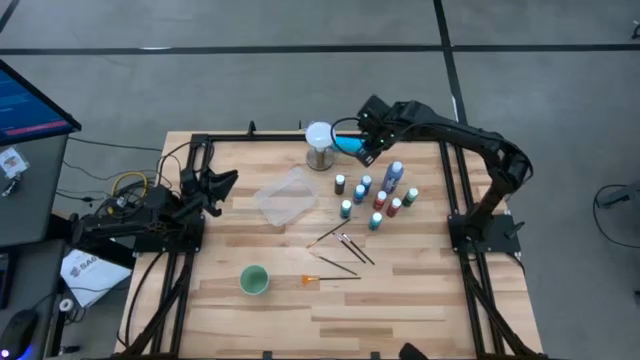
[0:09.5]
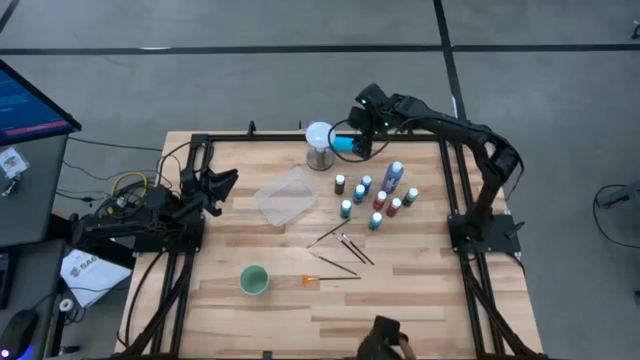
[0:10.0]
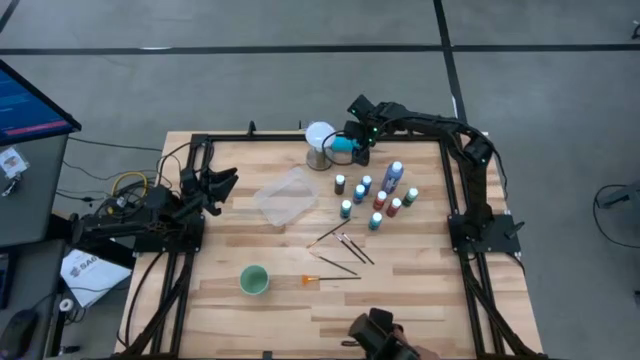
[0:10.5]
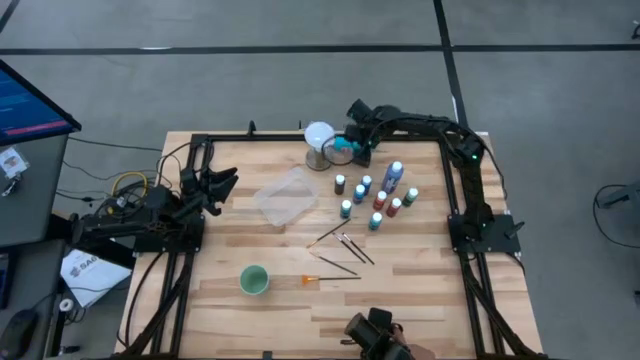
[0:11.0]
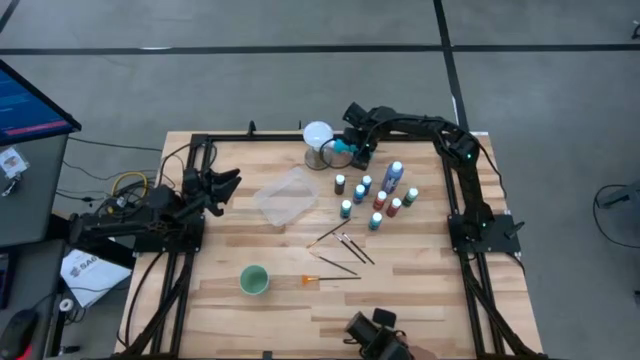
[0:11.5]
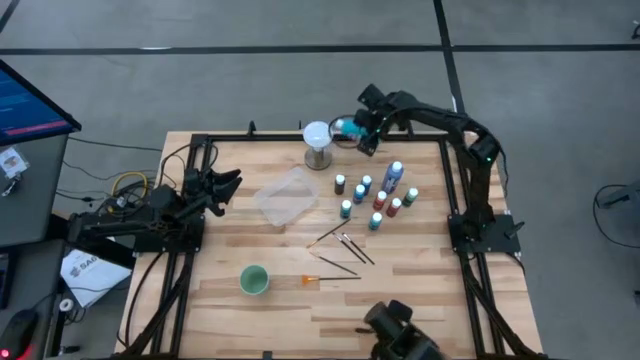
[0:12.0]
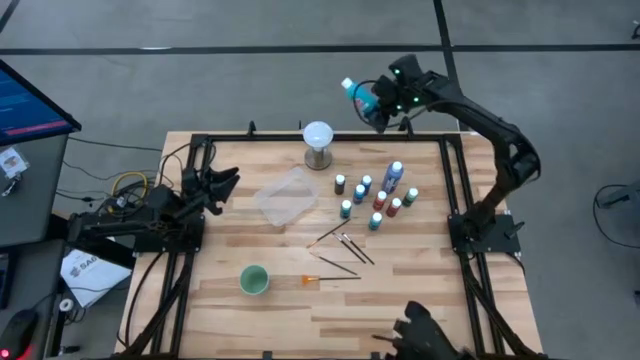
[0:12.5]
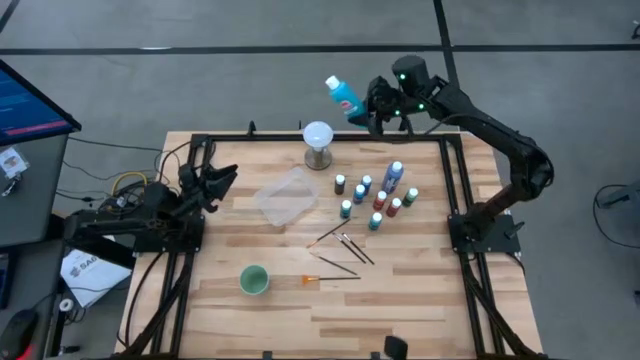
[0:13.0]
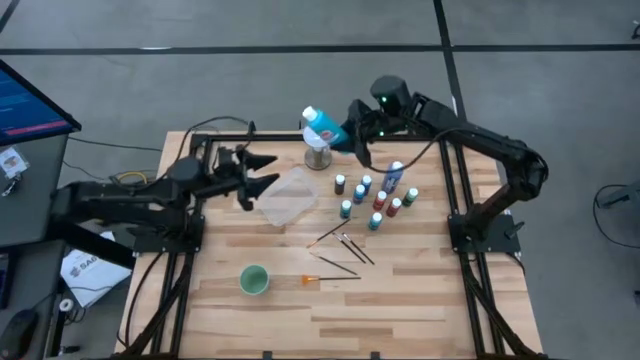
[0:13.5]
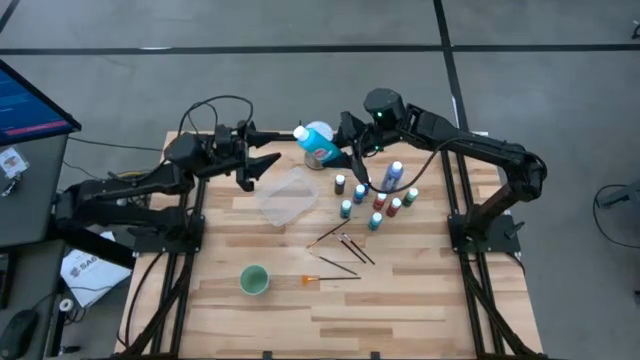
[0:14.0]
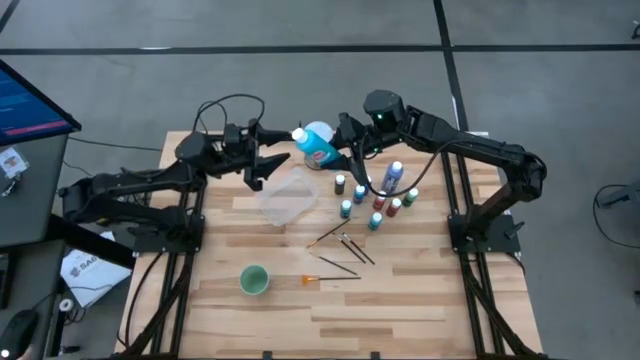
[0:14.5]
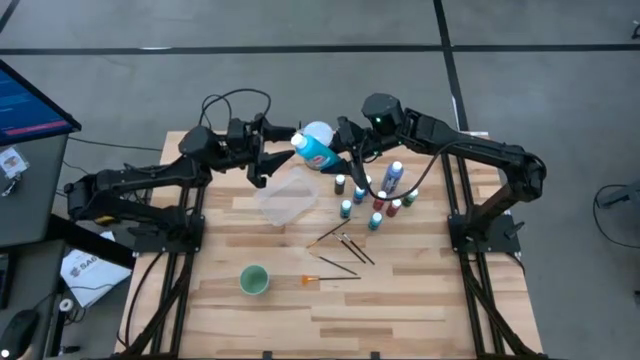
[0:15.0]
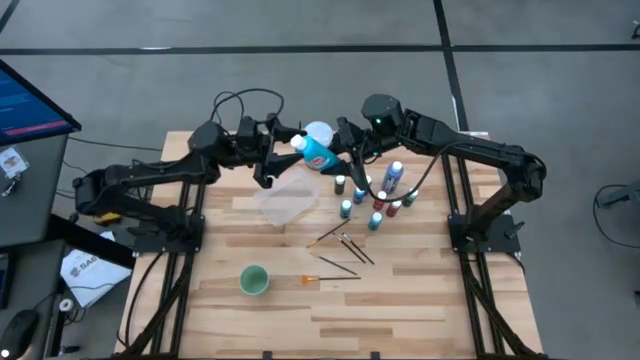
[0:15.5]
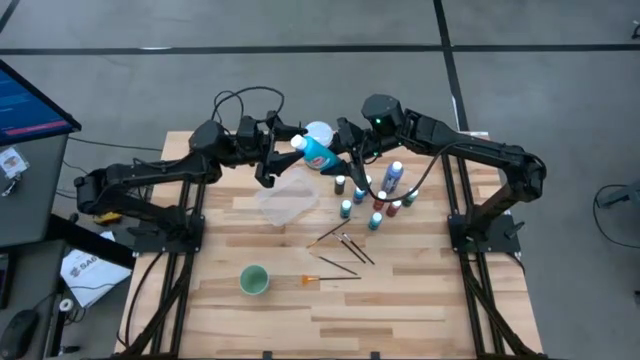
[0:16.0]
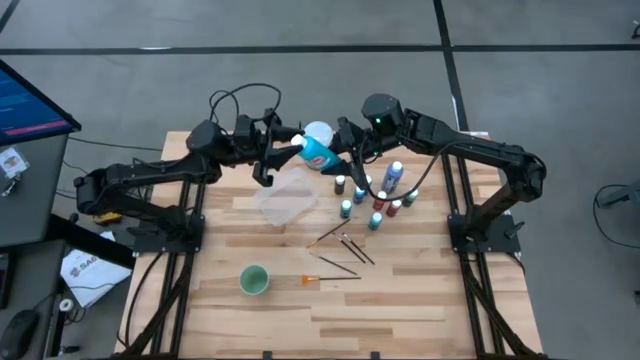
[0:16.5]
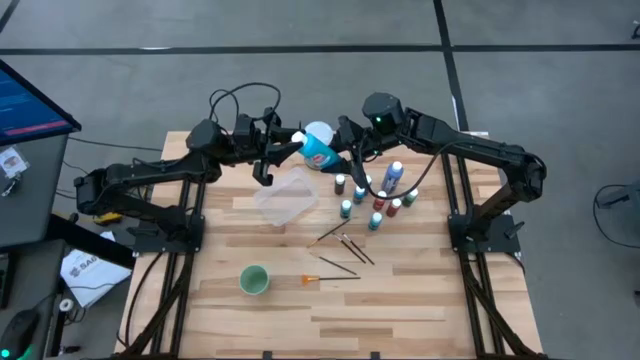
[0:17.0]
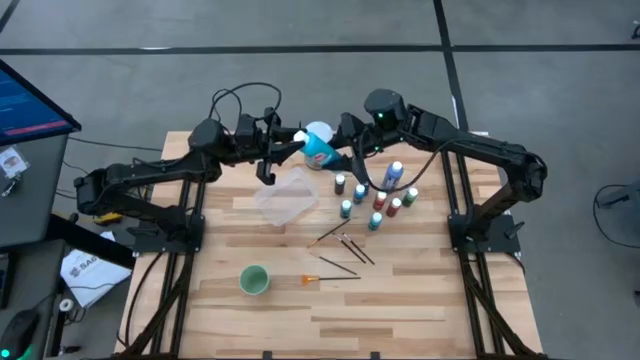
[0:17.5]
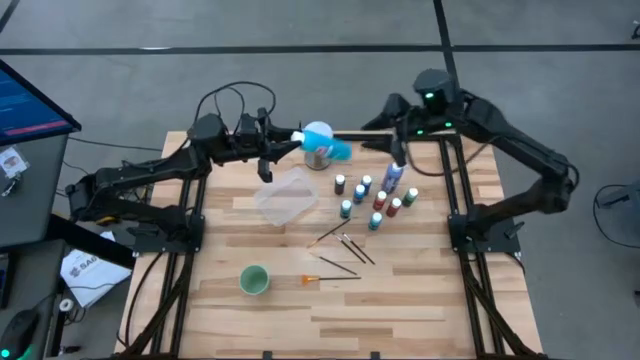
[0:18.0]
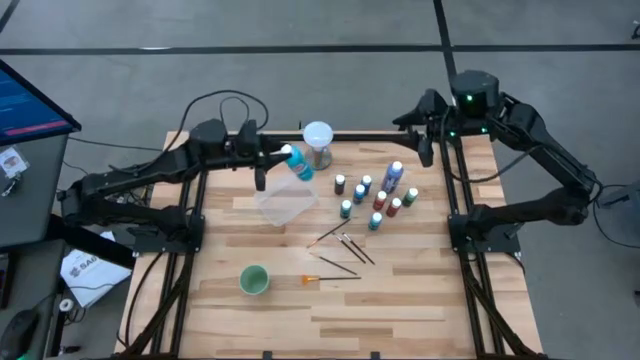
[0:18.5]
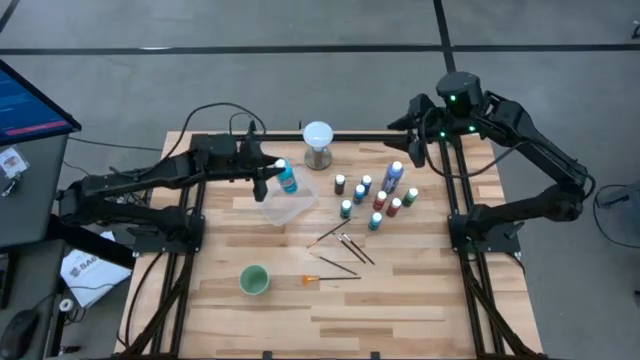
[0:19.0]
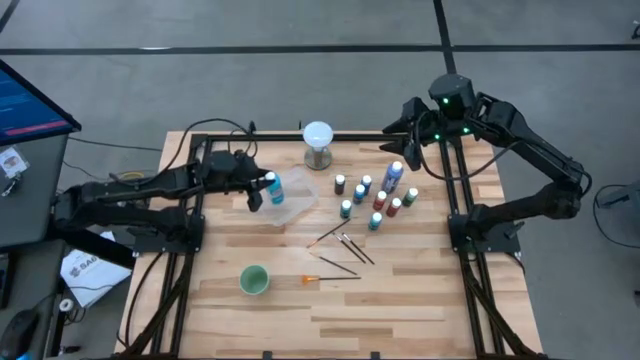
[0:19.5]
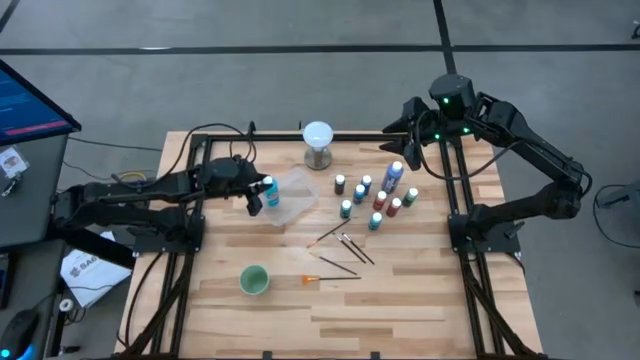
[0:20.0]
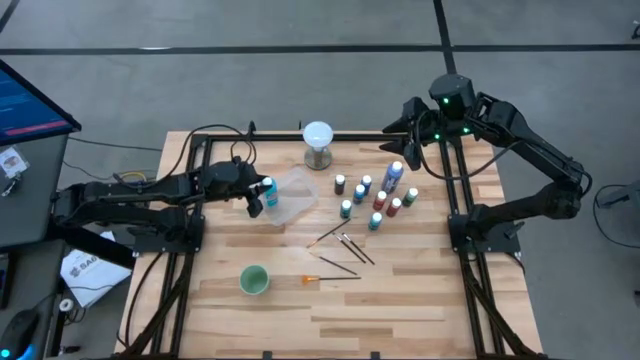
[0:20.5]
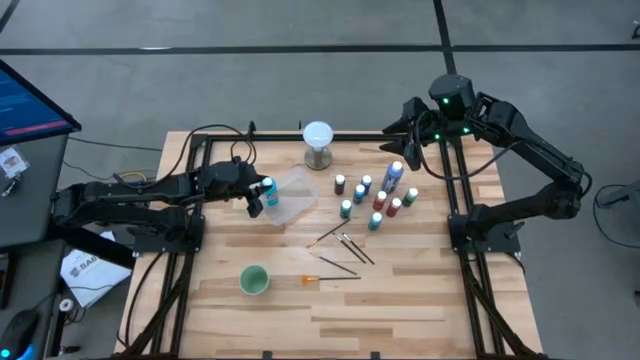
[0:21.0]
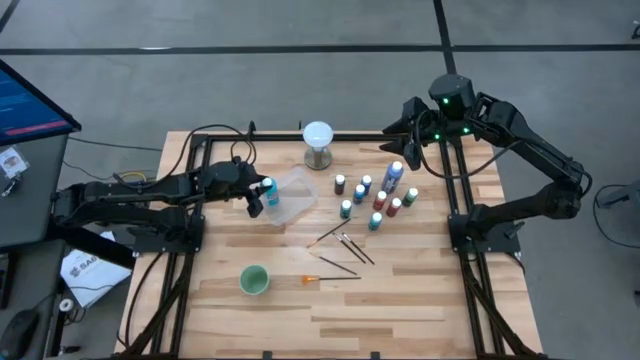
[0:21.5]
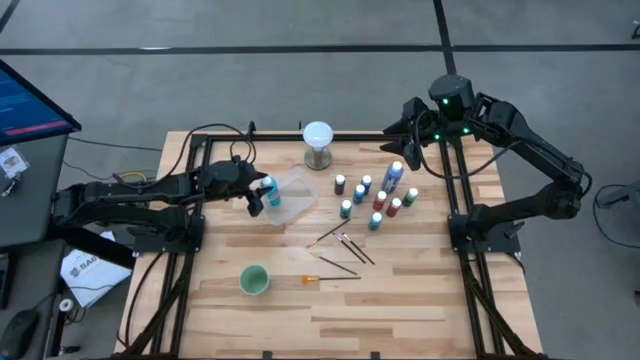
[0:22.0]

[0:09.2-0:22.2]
Task: Pick & Place Paint Supplies
Put the big light blue bottle into the white bin

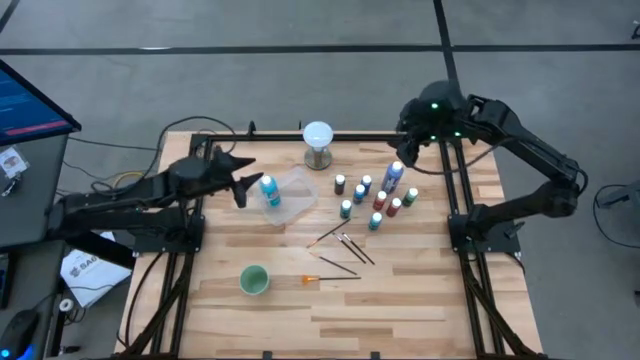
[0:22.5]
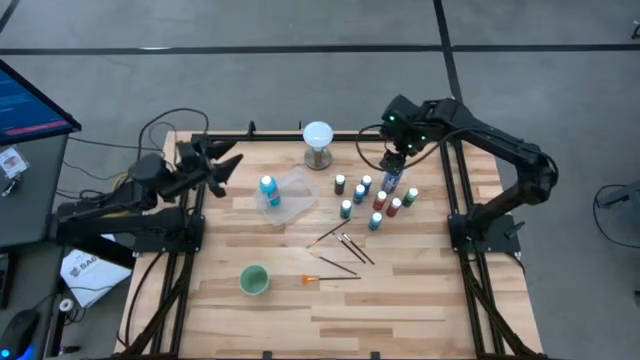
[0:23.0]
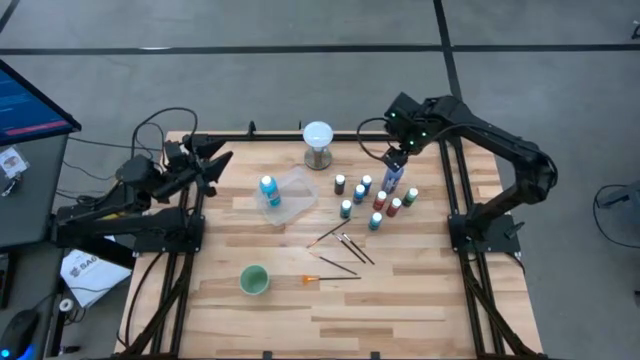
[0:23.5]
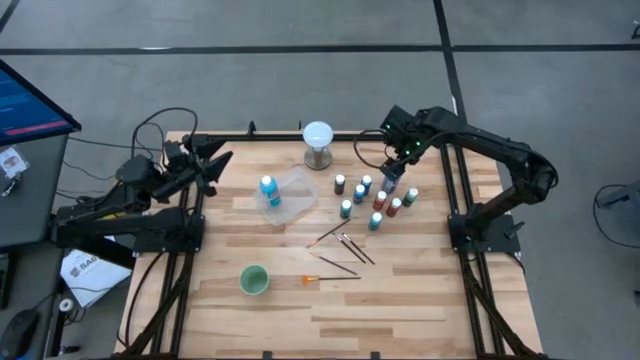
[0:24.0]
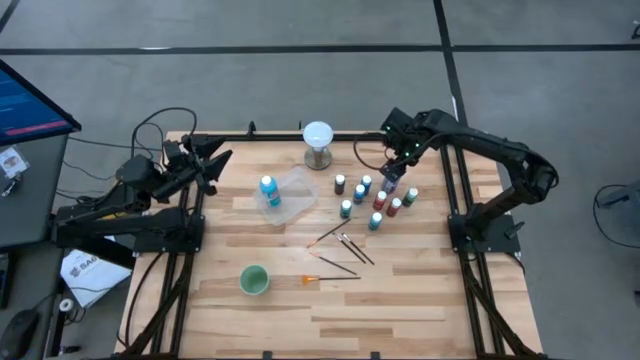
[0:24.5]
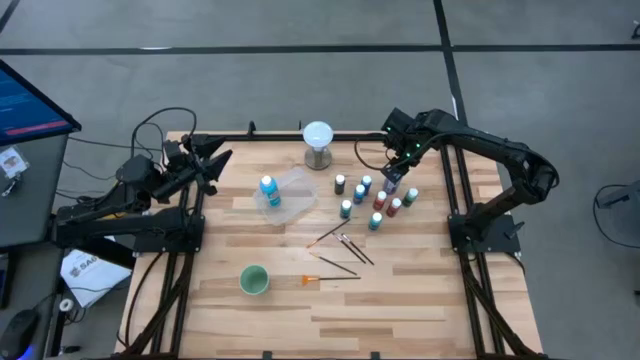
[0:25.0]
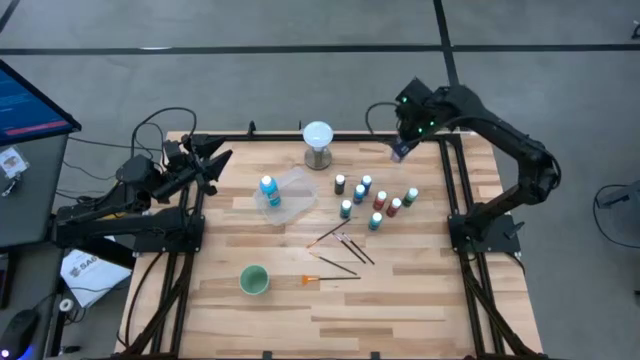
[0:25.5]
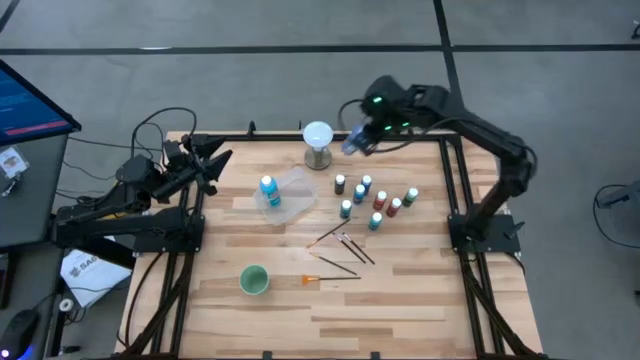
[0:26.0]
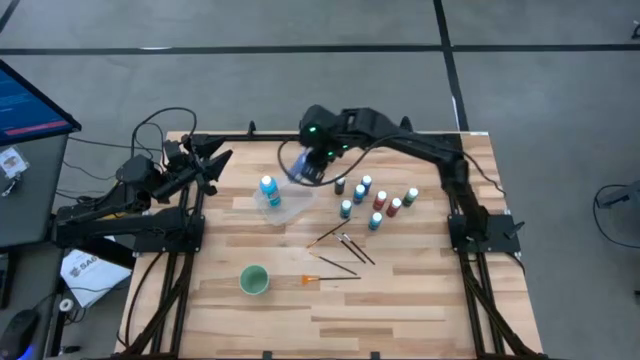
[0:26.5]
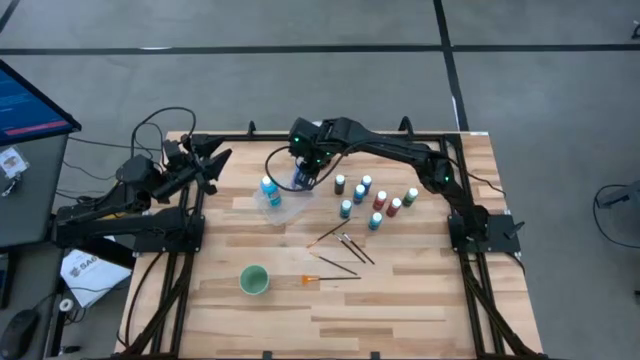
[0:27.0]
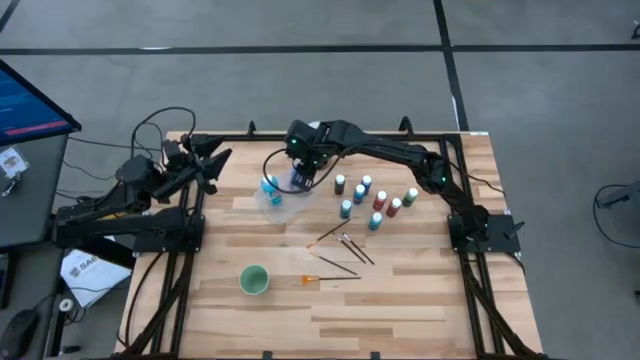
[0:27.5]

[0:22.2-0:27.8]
Put the big blue bottle into the white bin

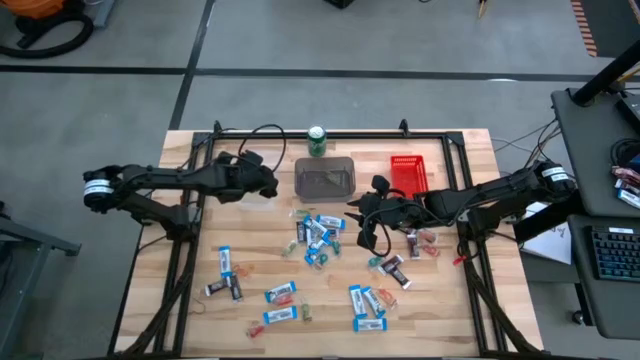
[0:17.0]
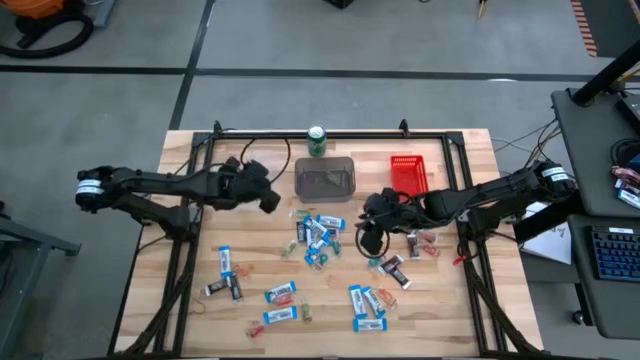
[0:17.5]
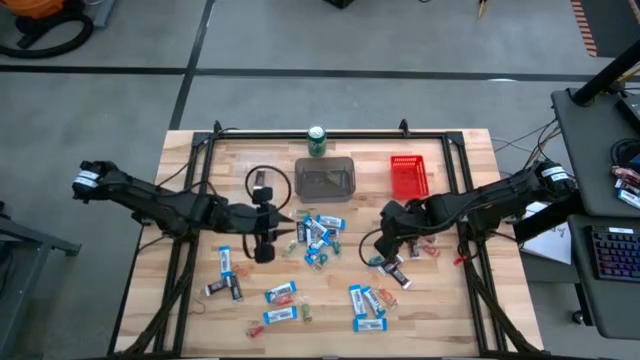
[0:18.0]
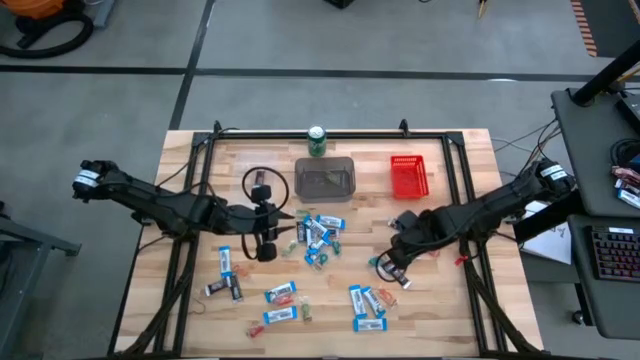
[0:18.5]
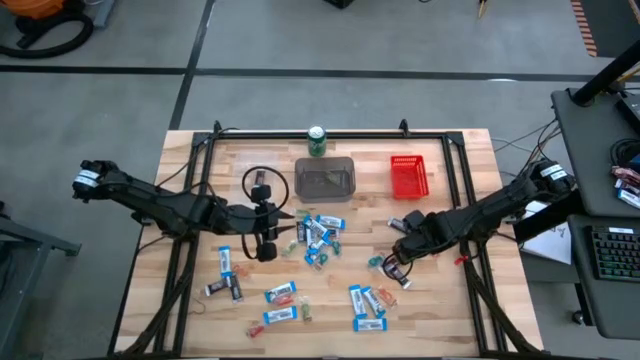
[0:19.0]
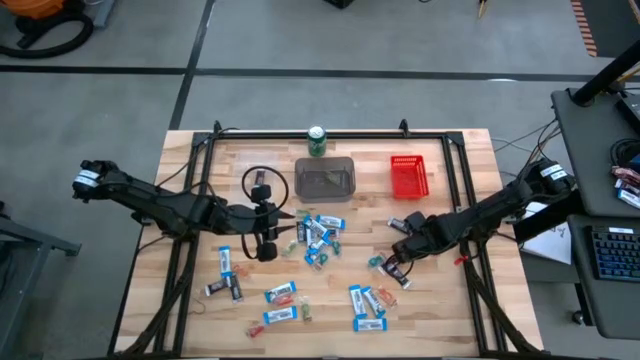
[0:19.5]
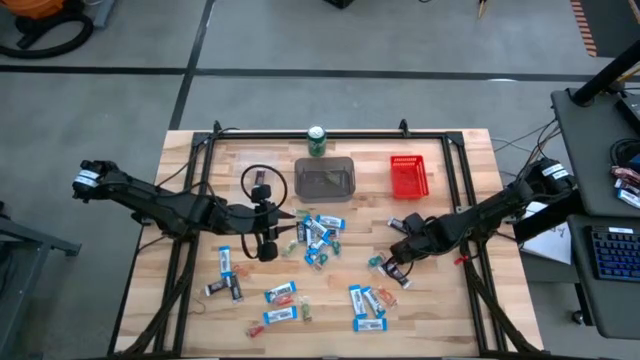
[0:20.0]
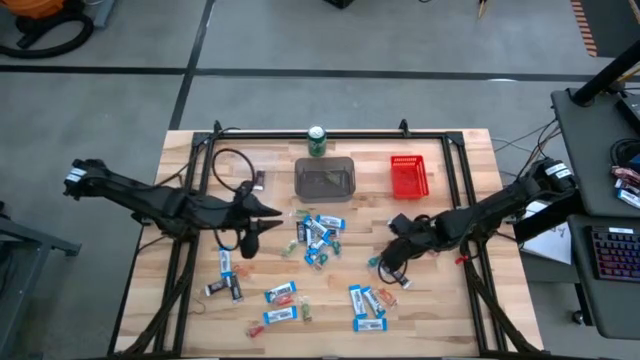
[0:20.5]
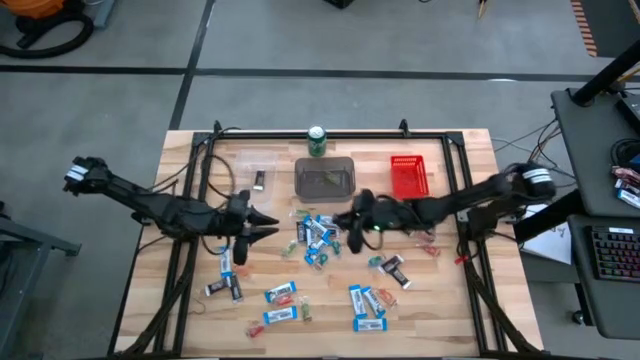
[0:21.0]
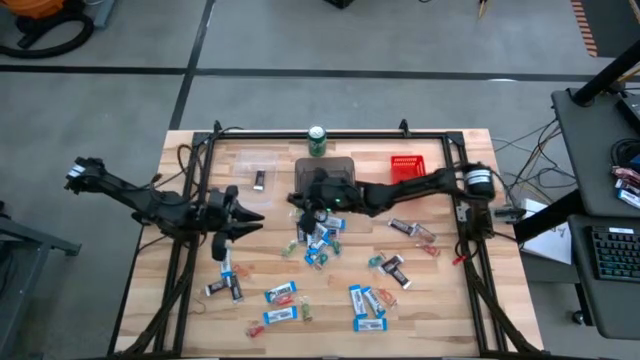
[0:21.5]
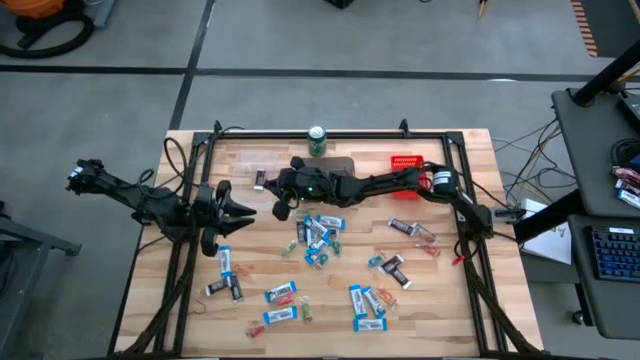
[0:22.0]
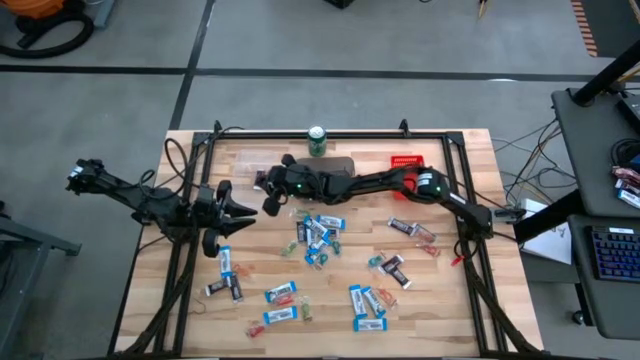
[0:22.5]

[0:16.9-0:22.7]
Task: Organize candy in baskets
Put the brown chocolate bar into the transparent bin
